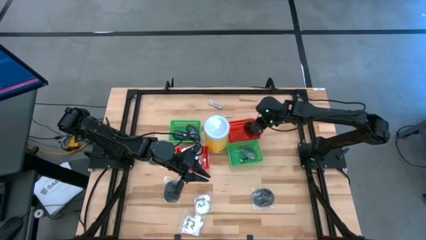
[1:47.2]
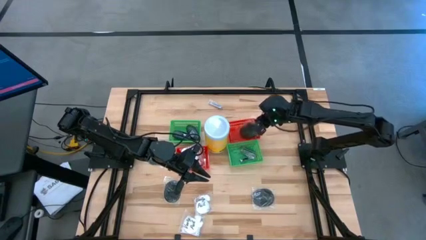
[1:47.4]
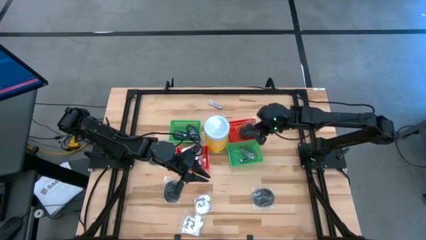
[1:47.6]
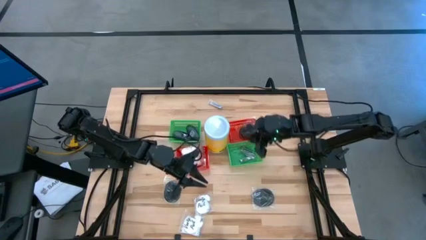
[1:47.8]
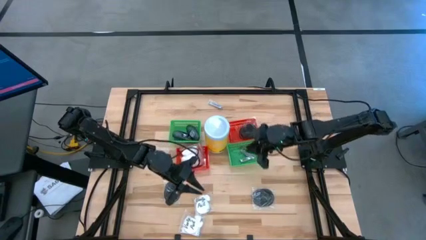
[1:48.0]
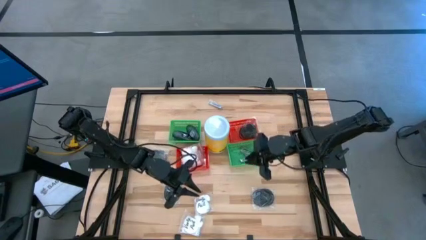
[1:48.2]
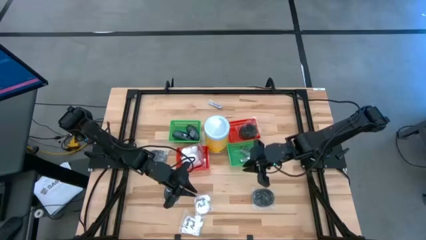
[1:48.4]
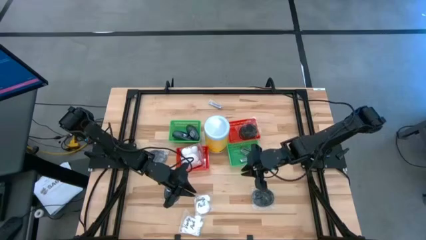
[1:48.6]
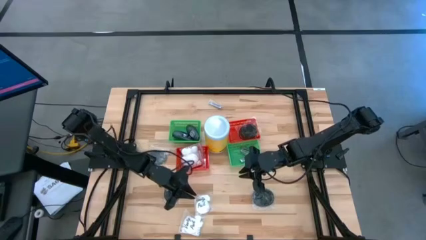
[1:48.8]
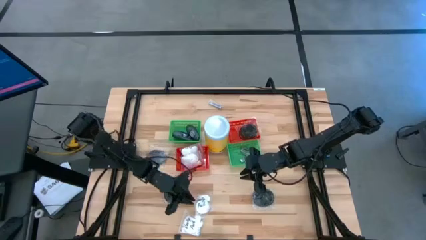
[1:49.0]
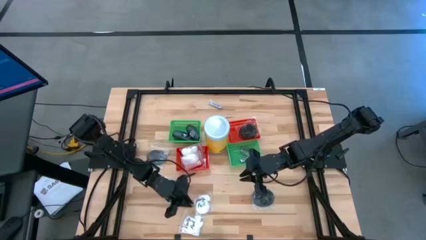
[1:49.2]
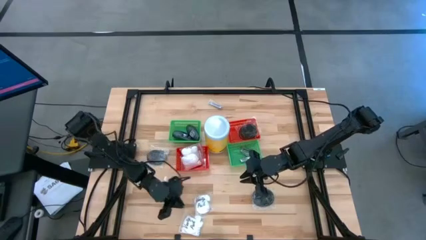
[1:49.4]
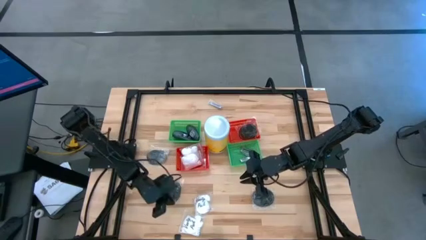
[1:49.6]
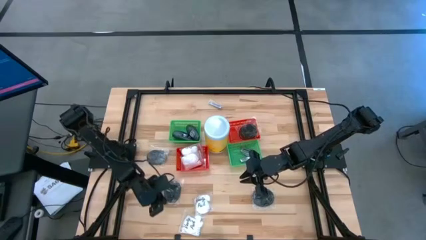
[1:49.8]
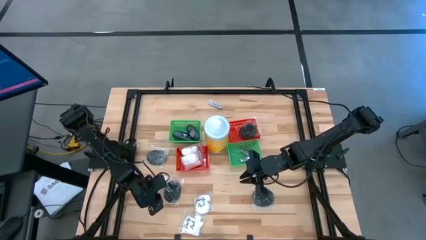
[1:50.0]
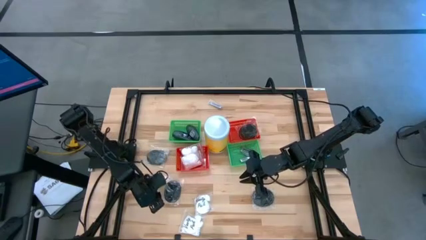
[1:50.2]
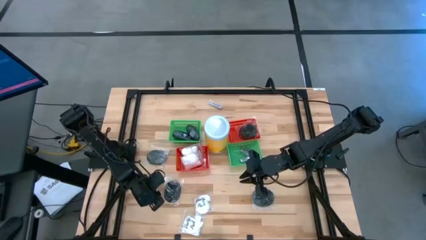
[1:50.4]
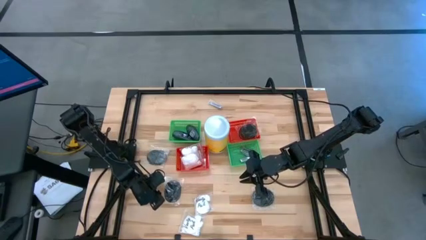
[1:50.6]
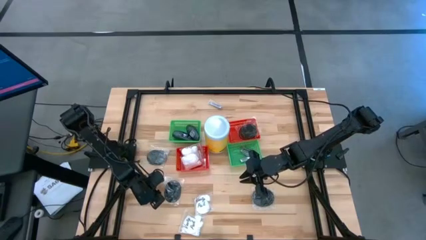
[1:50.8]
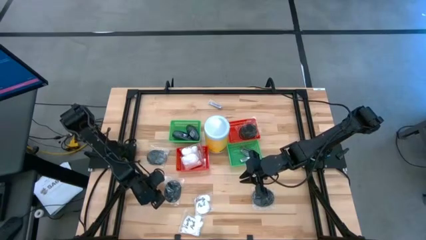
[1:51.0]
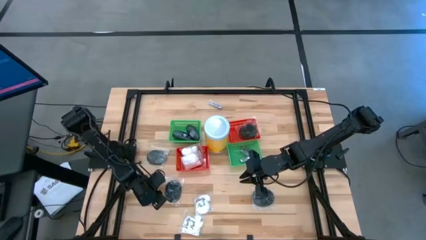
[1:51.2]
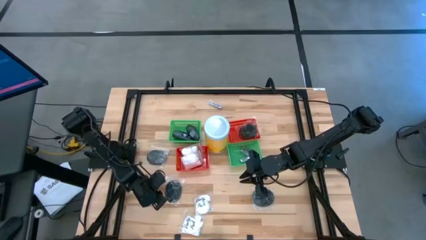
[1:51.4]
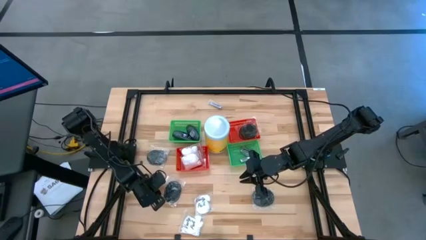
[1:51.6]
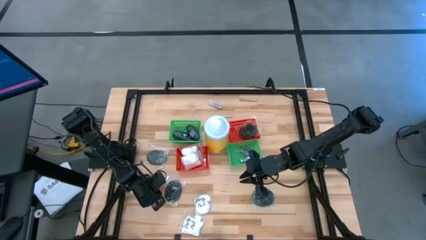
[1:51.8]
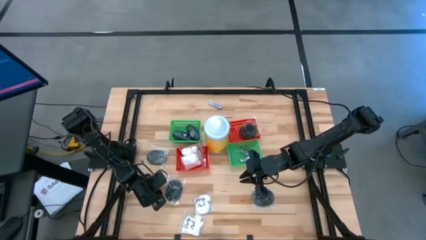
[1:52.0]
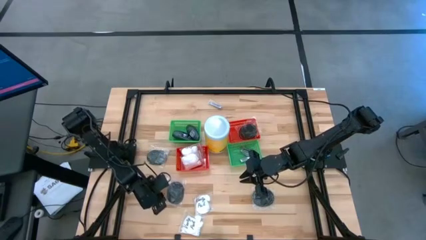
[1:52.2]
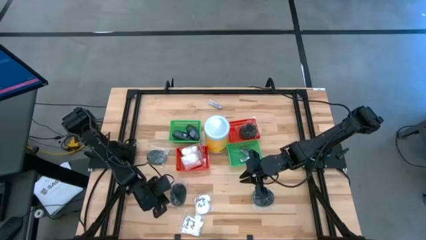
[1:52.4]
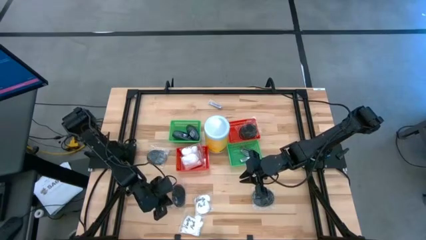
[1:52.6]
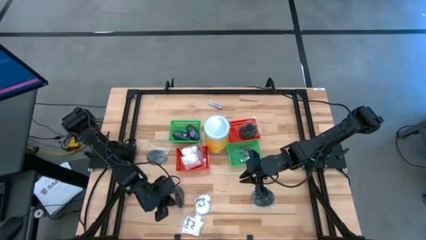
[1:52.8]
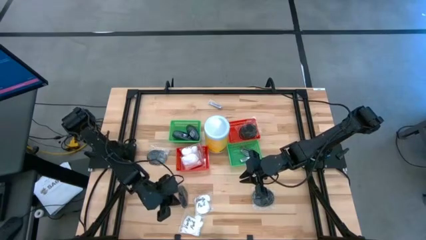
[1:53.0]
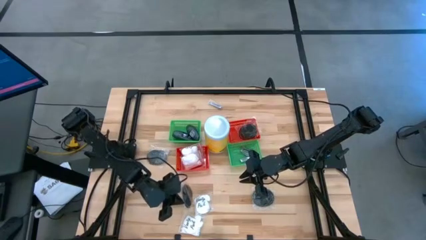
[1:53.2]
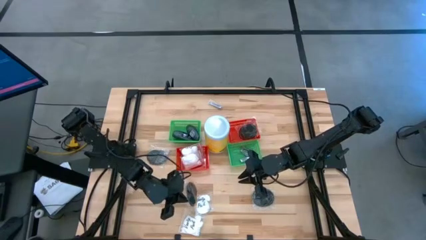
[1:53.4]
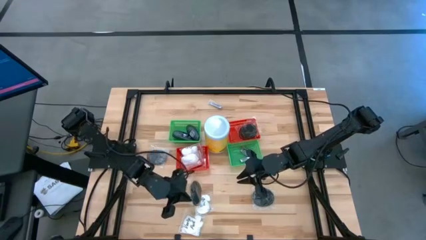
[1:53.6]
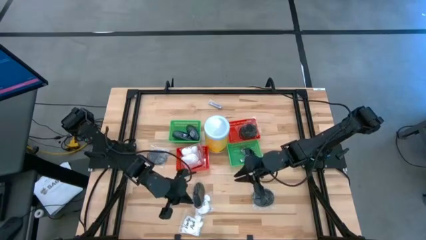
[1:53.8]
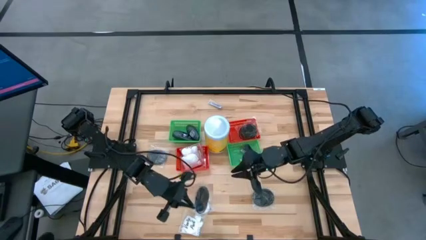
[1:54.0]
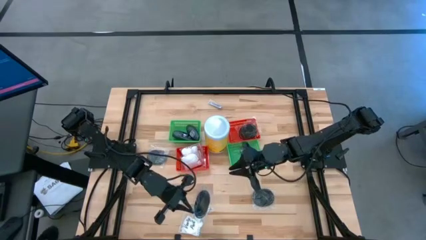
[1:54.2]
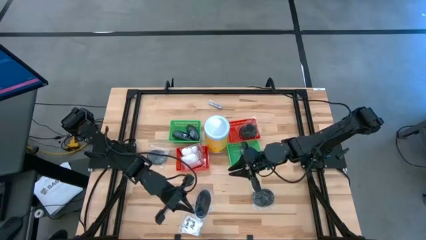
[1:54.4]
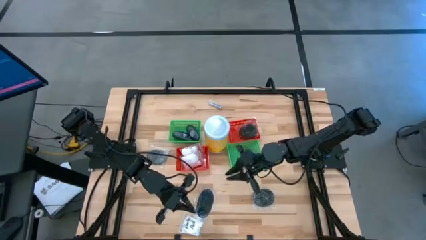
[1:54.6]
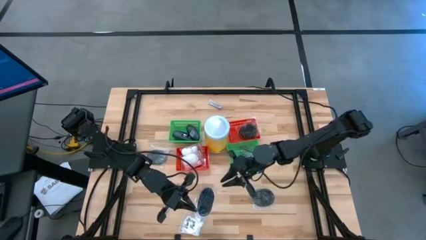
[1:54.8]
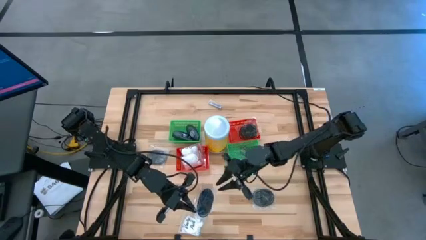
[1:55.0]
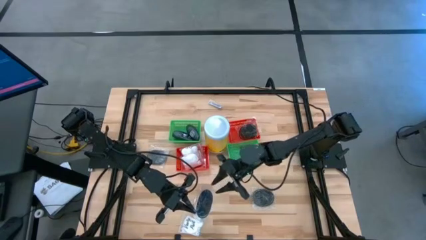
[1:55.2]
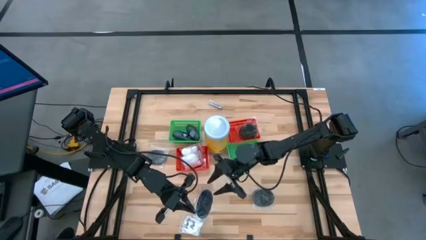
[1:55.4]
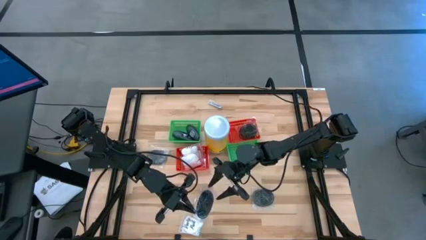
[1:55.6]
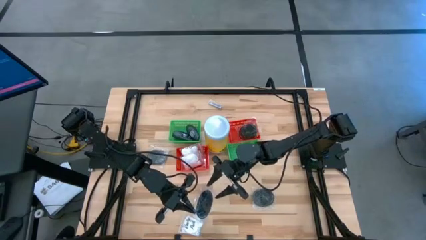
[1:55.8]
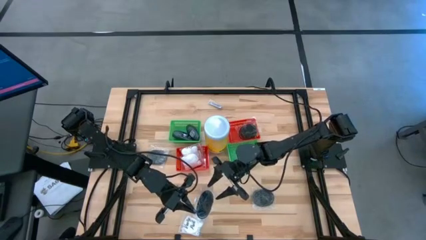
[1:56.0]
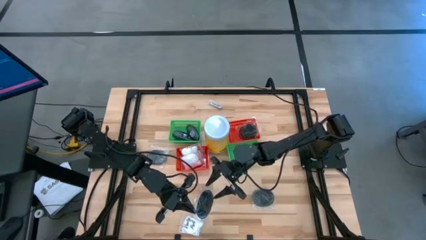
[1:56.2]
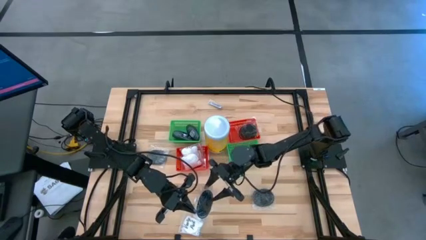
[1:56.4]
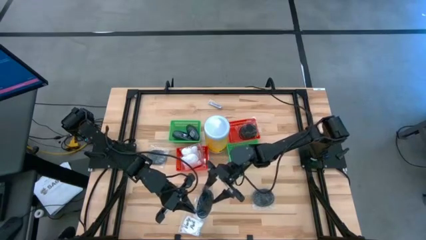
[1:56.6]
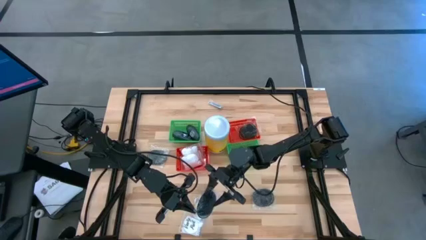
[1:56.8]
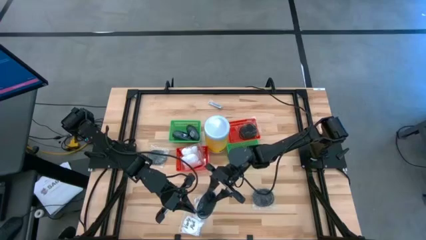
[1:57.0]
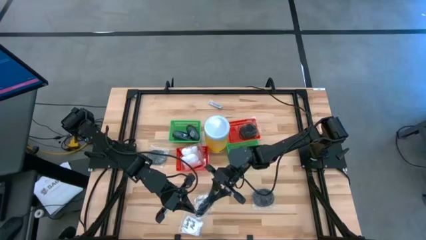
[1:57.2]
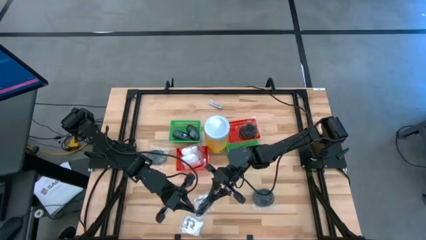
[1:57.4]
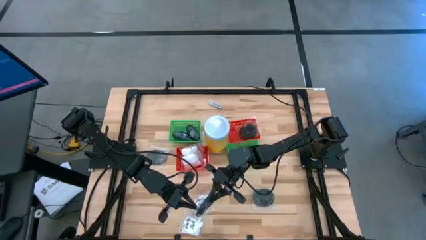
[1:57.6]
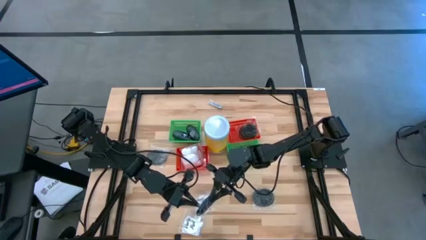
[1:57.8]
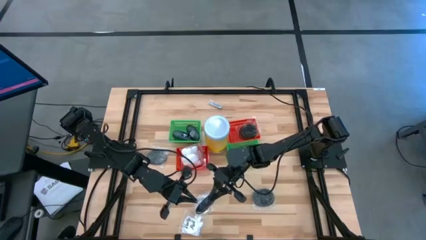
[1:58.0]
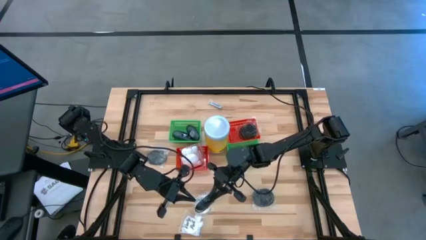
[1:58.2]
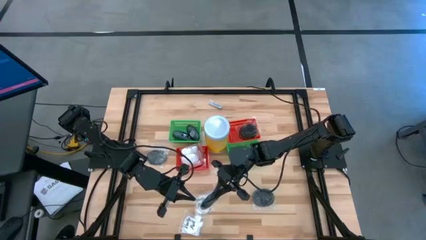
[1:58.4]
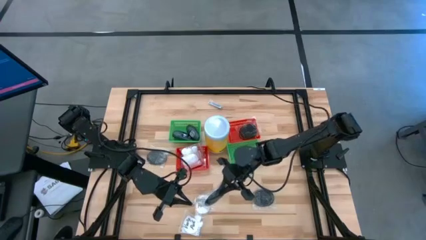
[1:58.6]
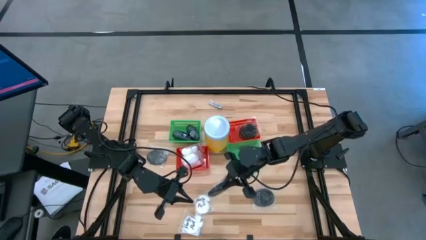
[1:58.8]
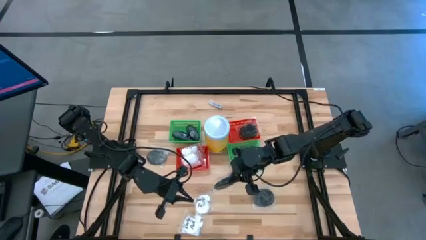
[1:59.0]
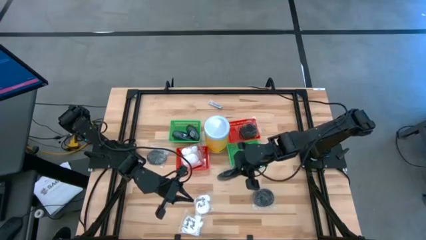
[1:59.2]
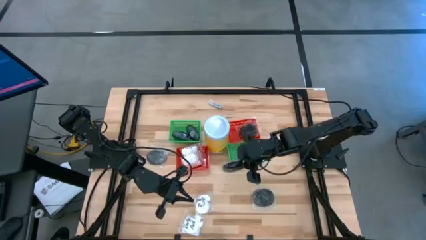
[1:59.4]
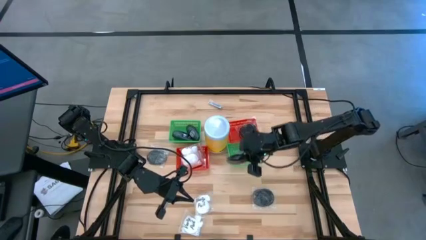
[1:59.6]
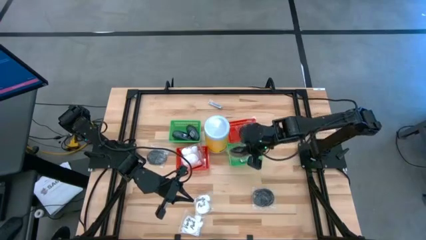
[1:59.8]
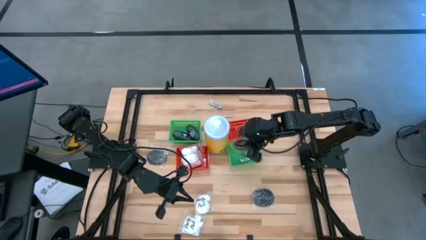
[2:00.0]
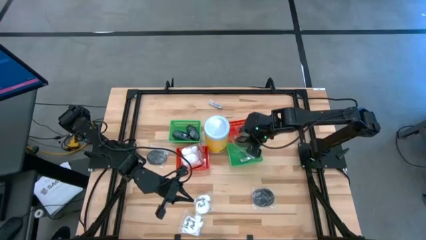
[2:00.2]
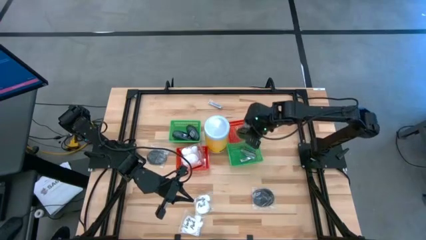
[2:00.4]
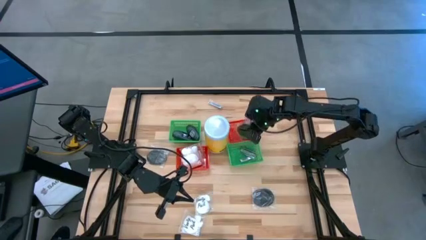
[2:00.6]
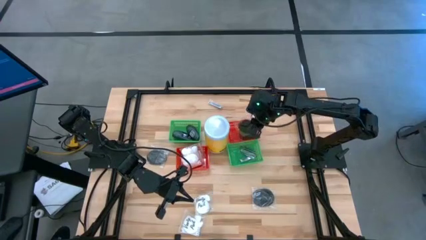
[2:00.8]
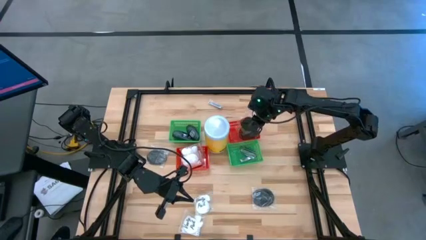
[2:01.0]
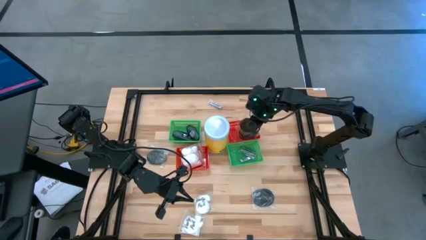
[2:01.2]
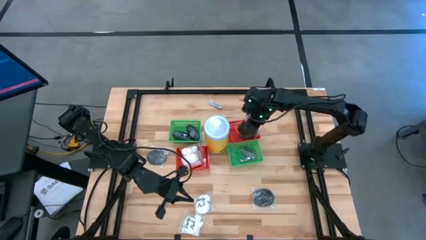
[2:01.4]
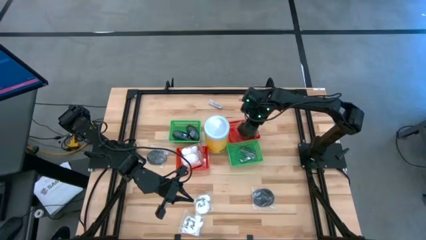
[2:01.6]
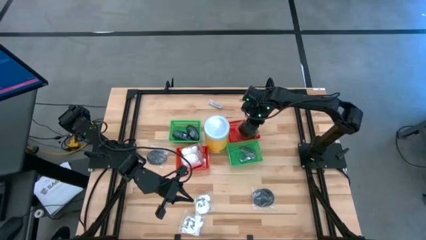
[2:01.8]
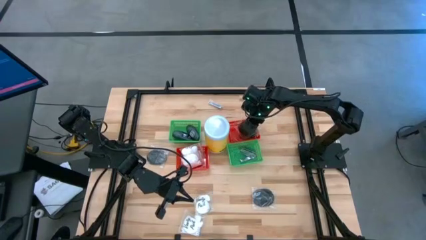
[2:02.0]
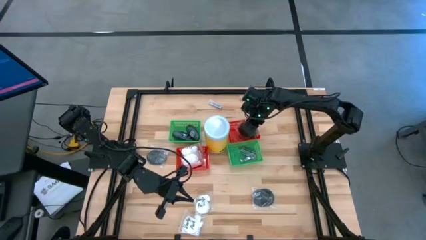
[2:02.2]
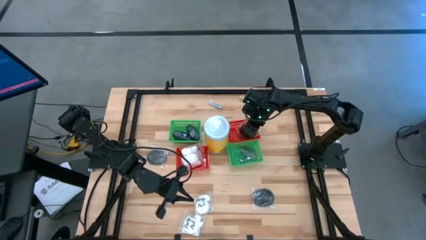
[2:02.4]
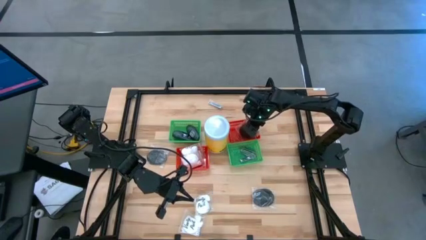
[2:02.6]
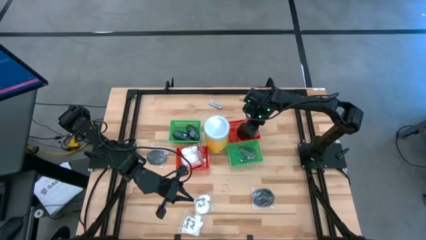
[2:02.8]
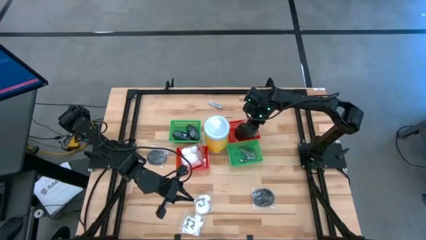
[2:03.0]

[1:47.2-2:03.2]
Task: Pick & Place Travel size toiletries
Put the black hair brush into the right red bin
